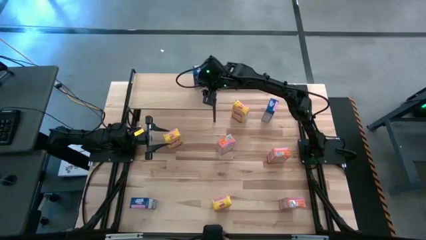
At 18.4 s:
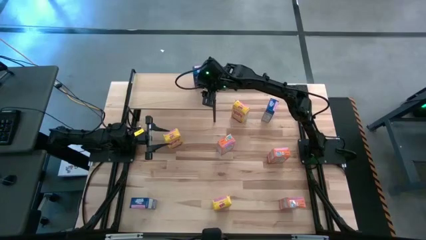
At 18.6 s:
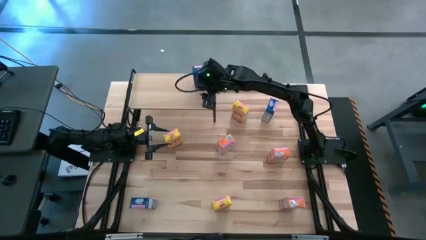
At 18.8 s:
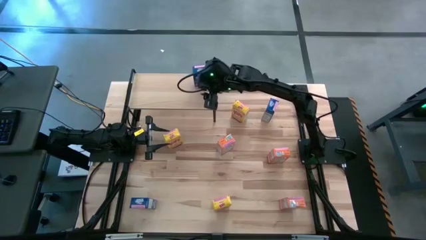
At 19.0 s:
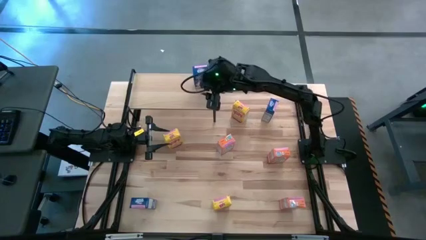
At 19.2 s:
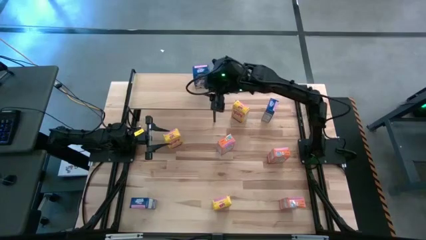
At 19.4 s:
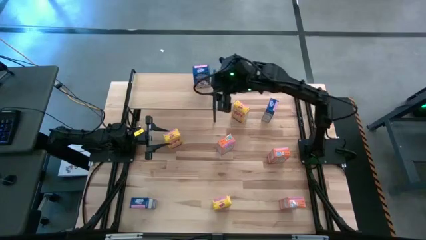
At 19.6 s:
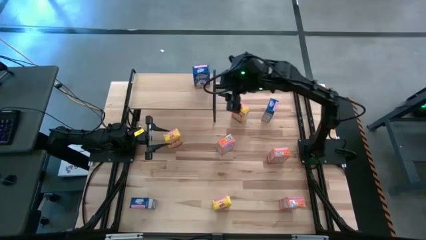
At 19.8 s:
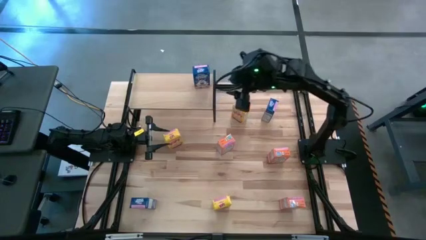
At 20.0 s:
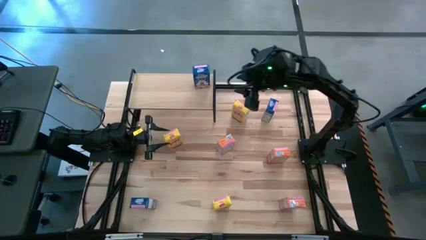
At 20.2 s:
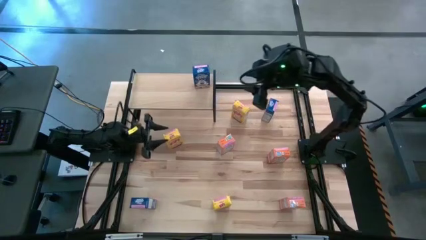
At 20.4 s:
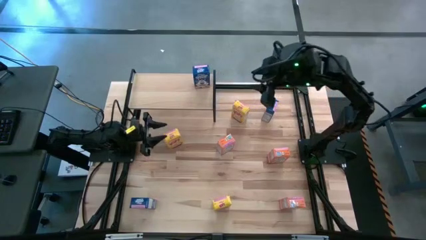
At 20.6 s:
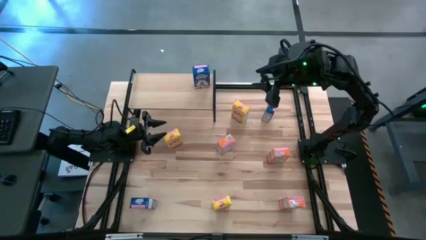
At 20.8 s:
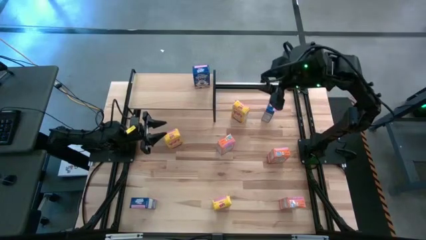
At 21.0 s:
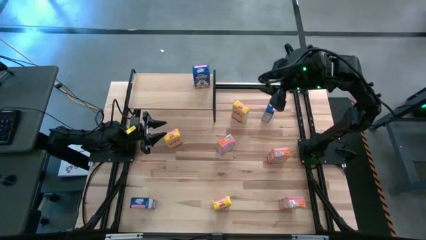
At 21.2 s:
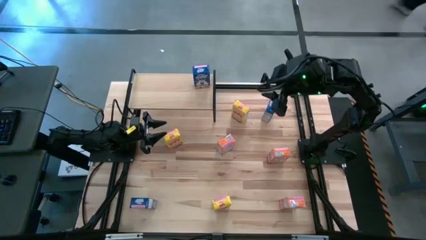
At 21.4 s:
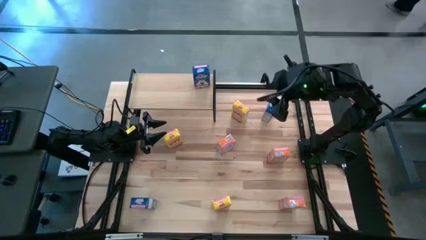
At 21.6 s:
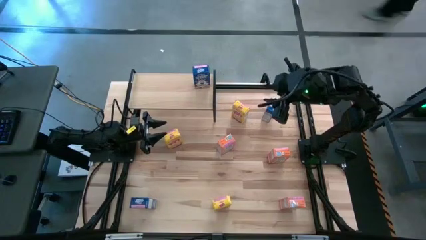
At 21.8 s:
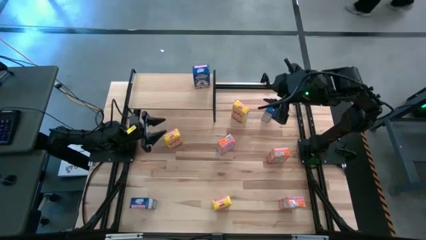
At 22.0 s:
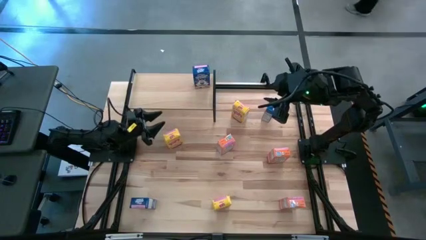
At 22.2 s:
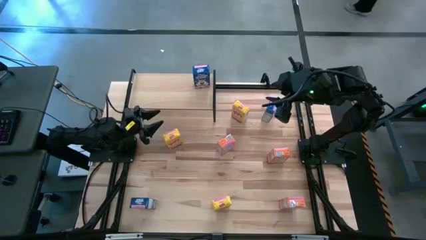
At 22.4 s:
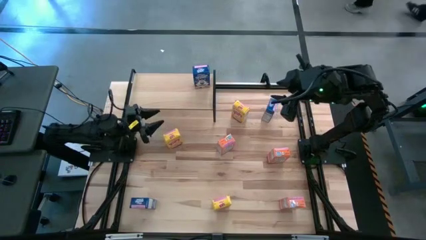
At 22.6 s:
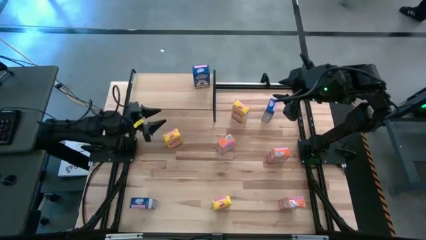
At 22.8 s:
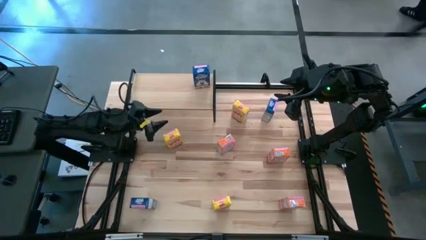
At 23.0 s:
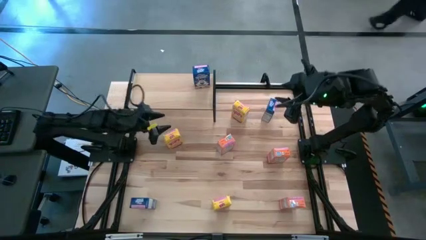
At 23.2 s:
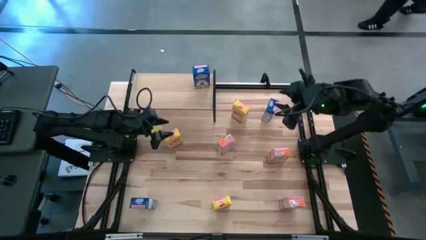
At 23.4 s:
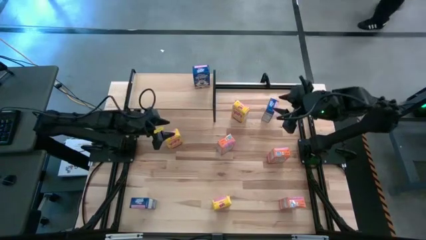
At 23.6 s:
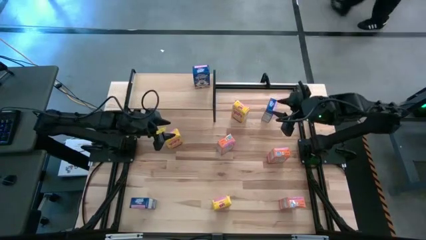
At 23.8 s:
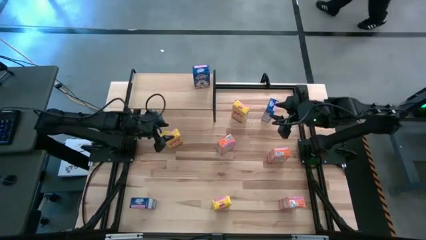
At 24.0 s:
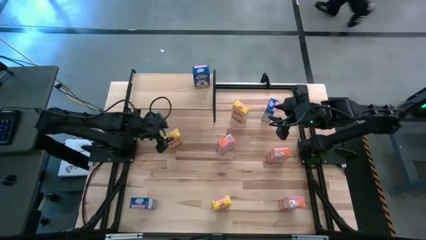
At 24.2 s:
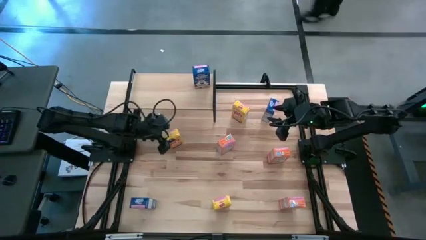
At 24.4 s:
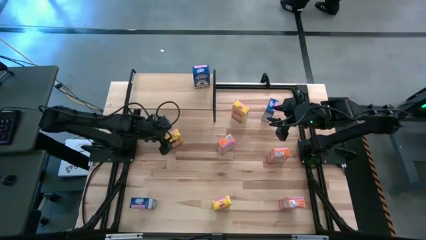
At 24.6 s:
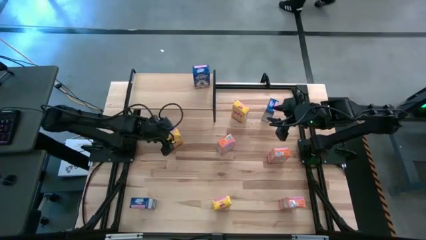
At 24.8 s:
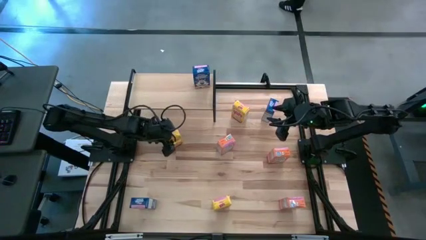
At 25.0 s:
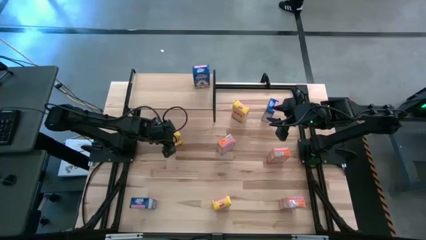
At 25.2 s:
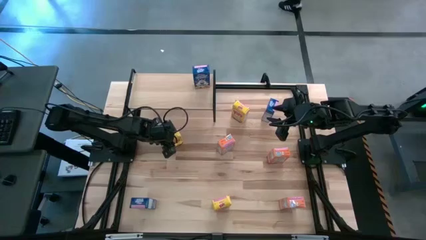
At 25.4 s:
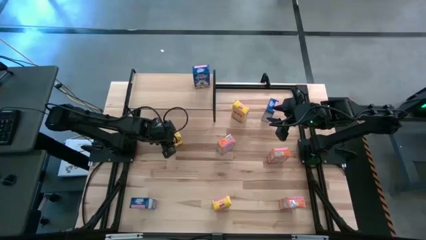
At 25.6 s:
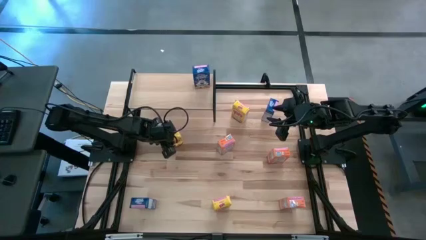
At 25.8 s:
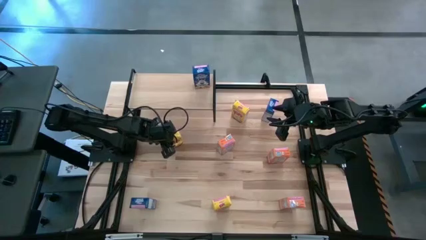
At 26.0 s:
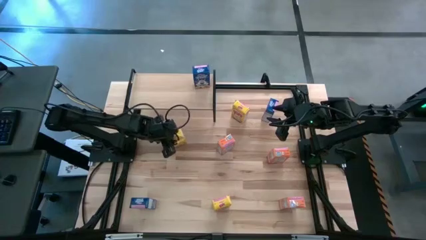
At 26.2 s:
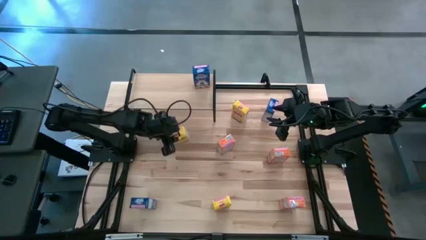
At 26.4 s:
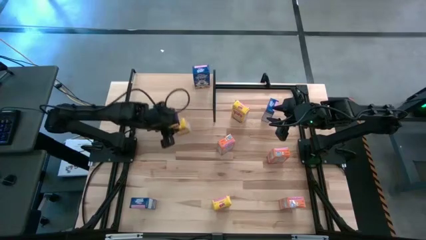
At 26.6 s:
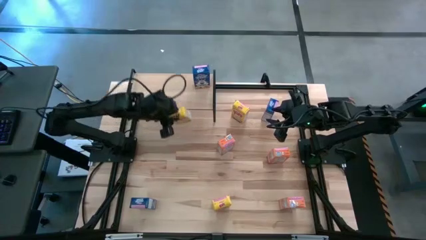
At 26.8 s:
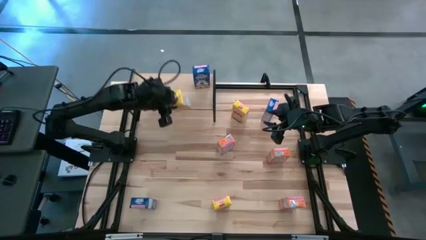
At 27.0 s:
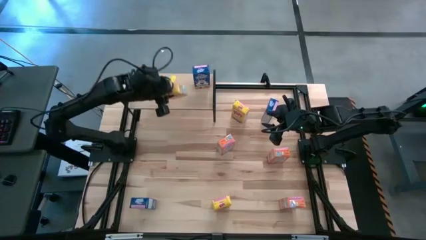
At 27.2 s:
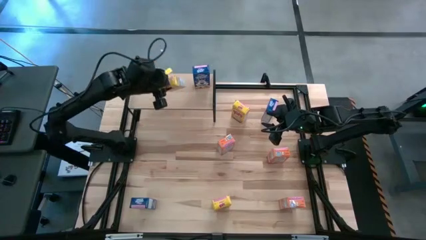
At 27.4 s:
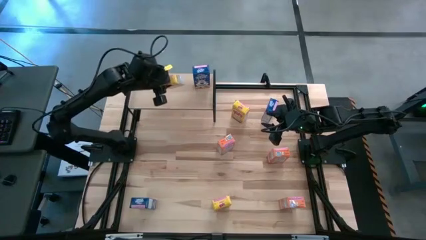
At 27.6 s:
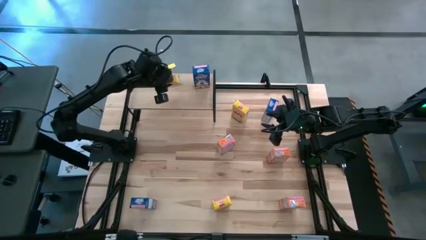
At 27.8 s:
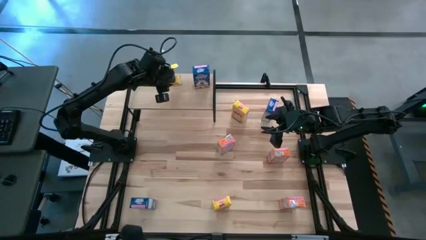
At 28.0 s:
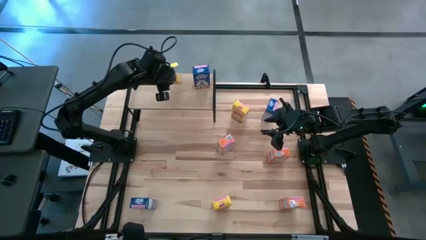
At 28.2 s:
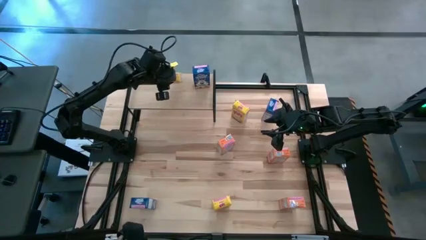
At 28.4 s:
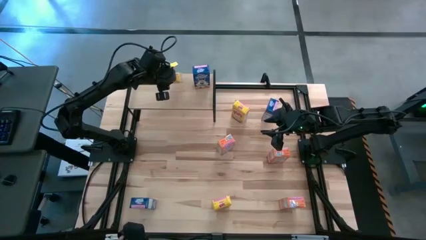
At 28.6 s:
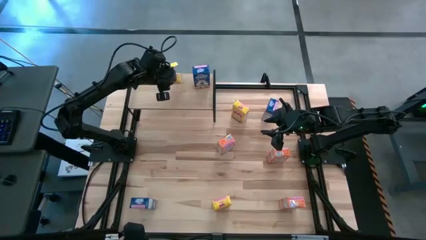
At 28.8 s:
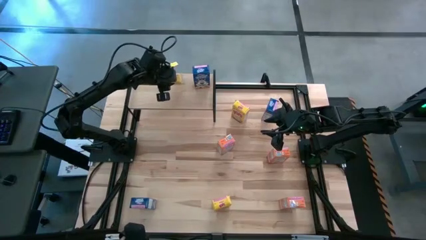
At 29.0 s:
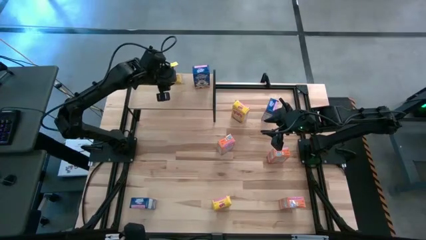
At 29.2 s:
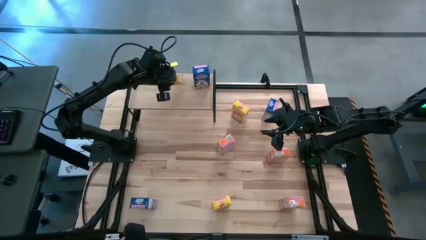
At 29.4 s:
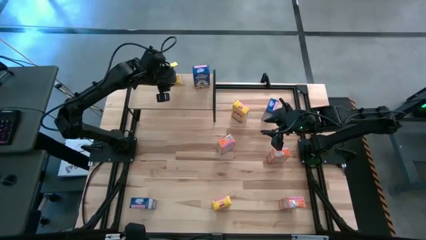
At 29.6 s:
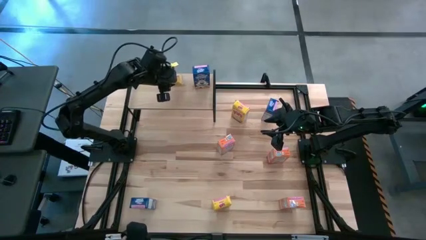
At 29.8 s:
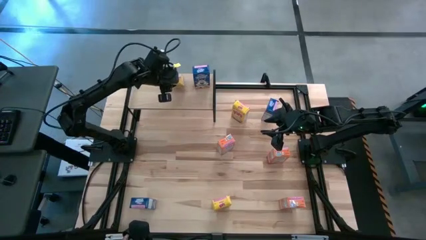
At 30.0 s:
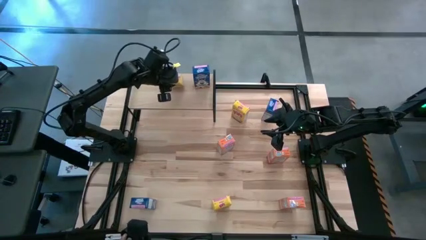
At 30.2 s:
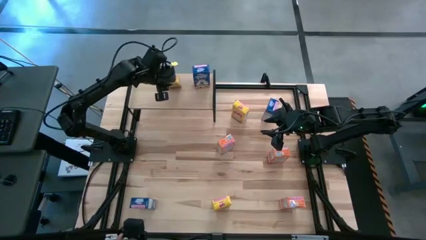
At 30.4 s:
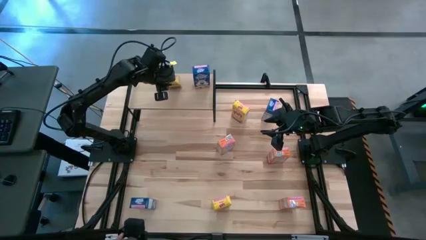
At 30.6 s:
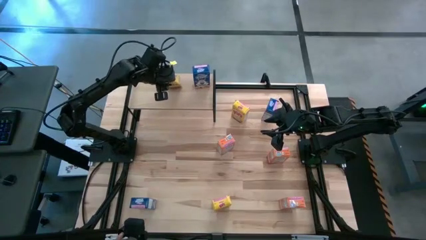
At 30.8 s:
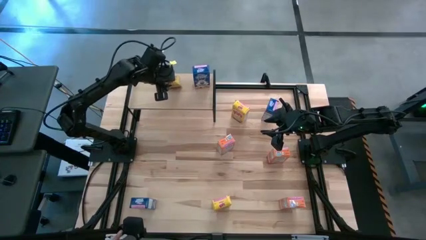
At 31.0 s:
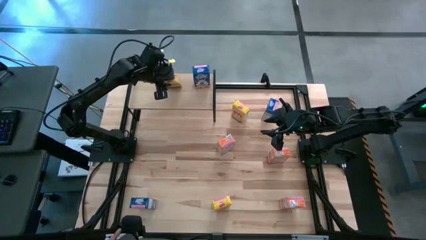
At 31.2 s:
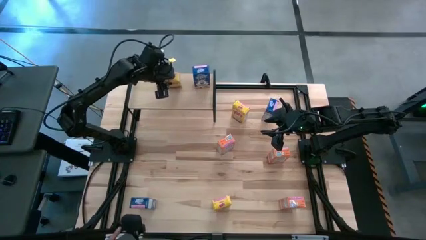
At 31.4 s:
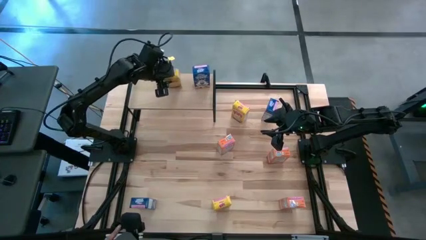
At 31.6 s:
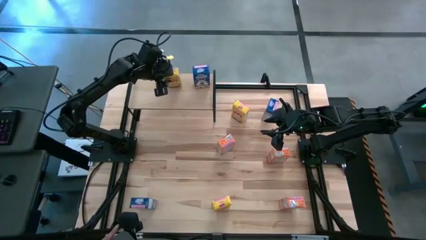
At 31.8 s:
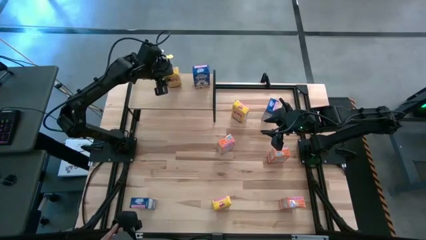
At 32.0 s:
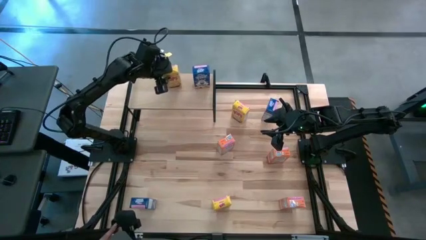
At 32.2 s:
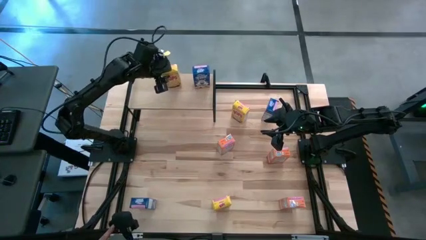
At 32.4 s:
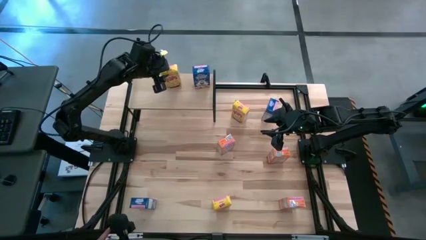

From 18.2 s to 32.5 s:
Task: Stack cereal on shelf
Put the middle yellow cereal box on the shelf
